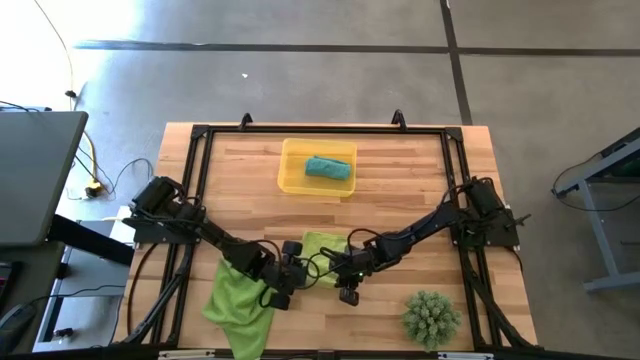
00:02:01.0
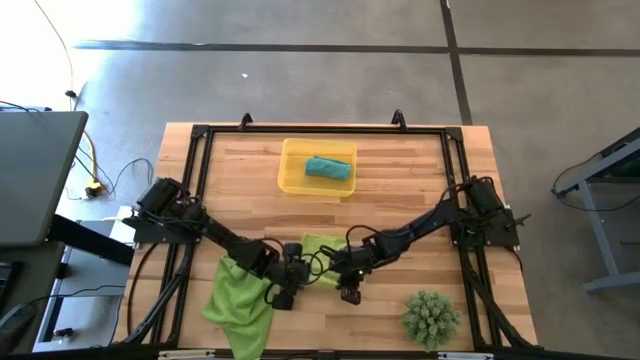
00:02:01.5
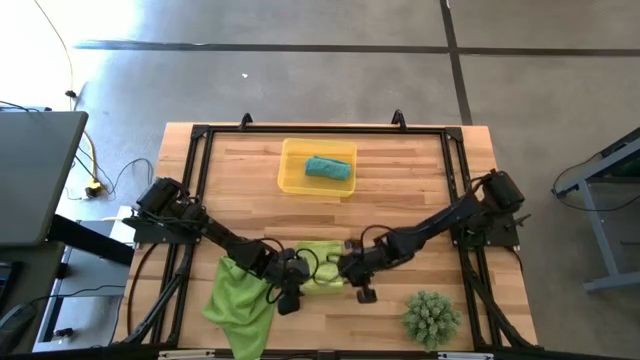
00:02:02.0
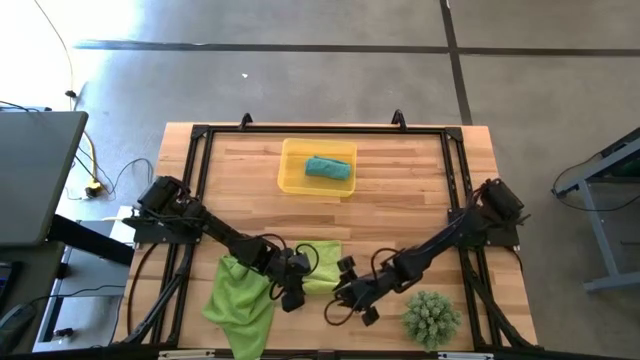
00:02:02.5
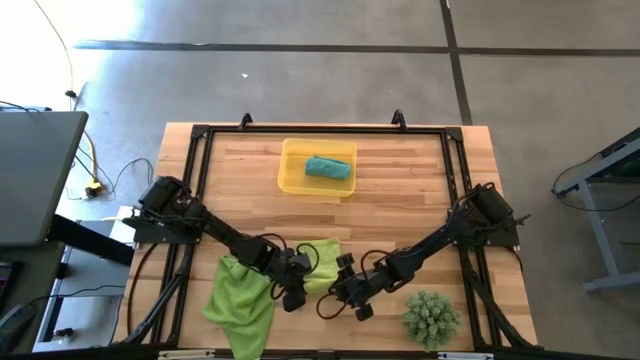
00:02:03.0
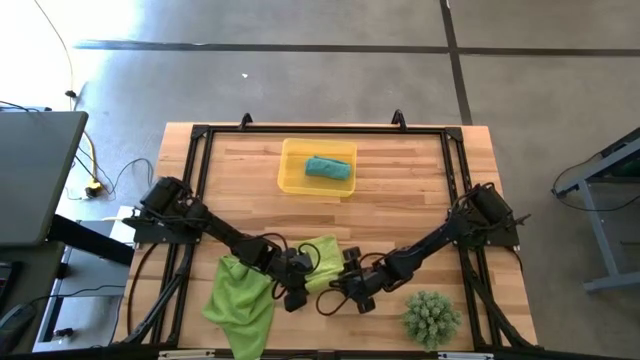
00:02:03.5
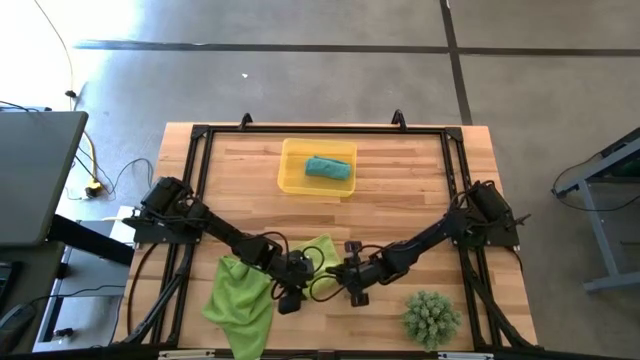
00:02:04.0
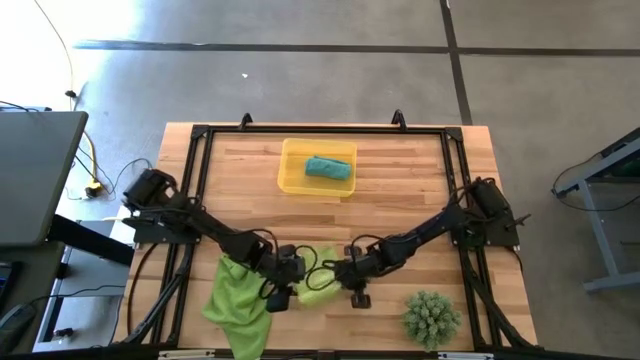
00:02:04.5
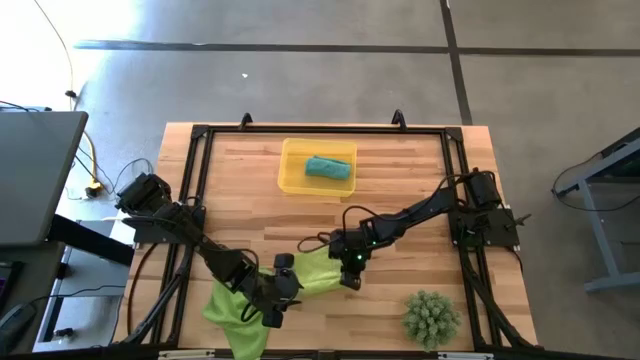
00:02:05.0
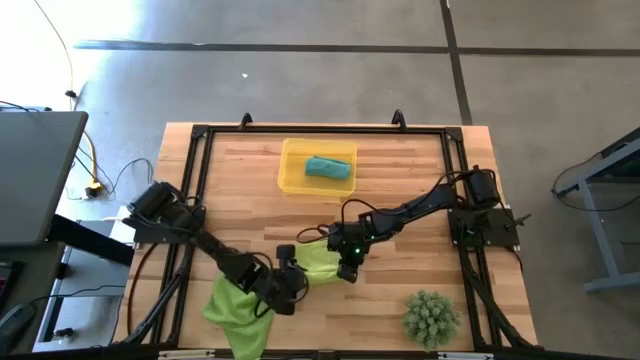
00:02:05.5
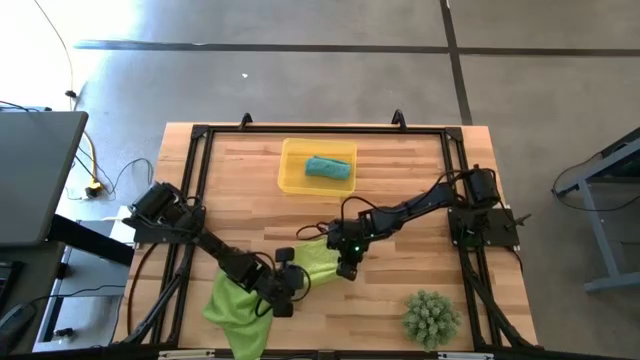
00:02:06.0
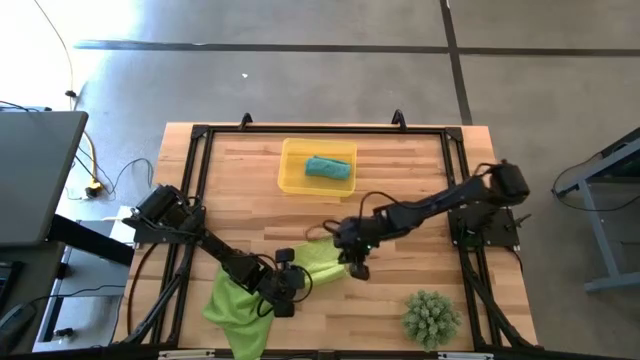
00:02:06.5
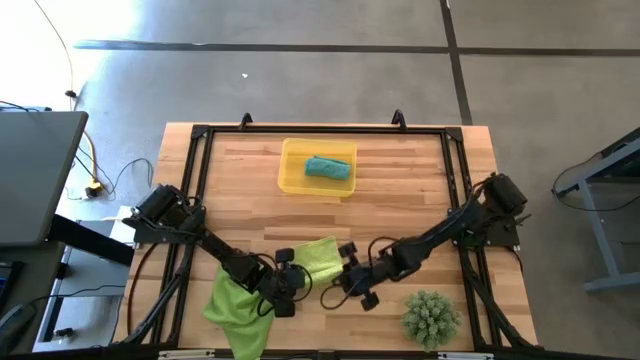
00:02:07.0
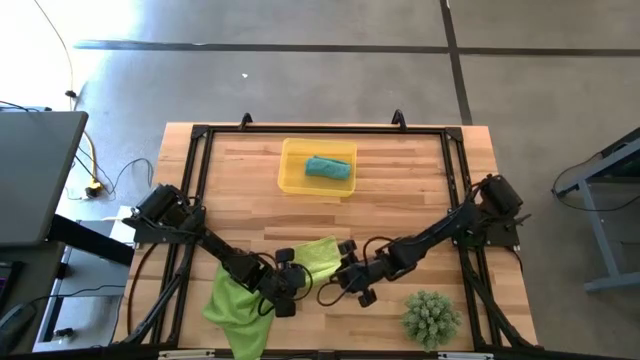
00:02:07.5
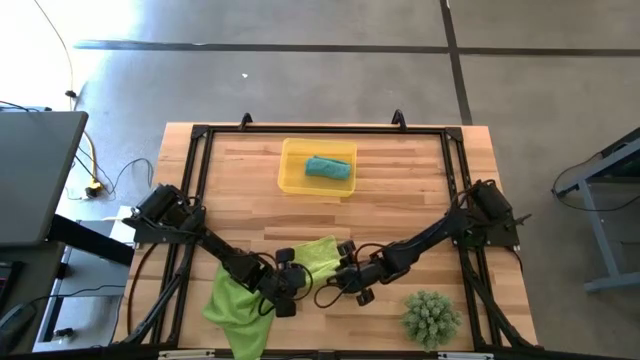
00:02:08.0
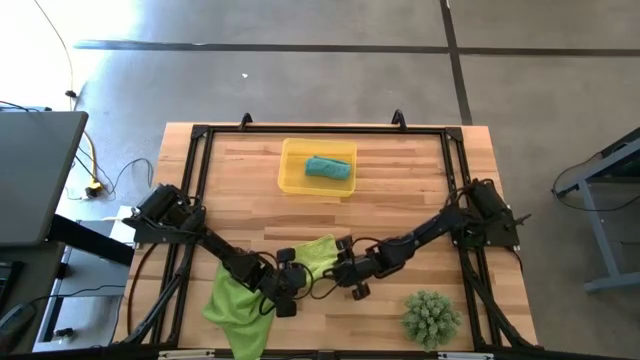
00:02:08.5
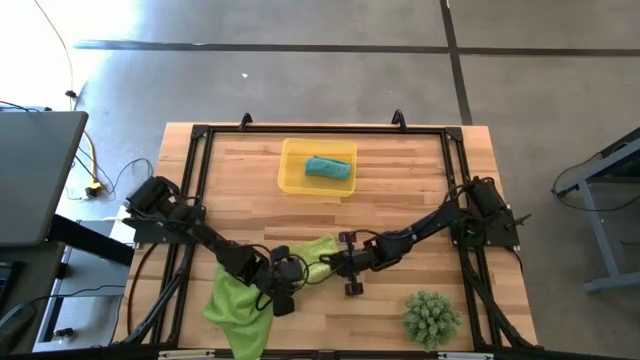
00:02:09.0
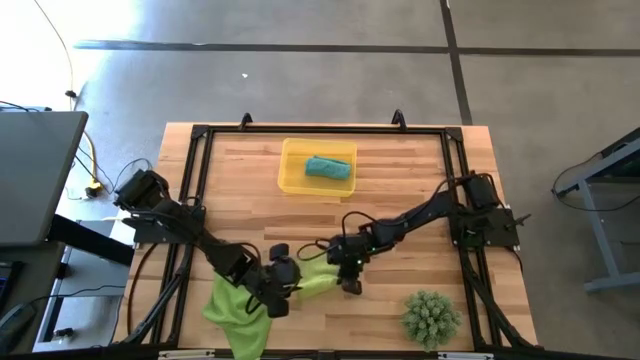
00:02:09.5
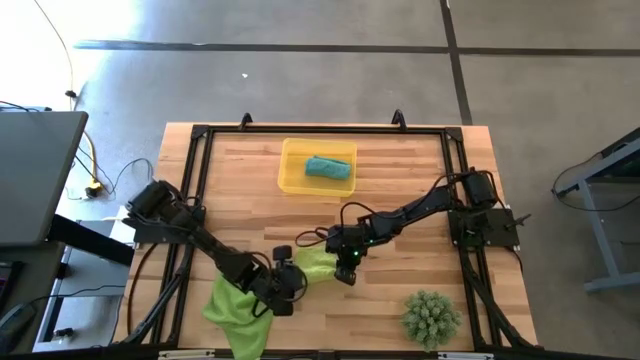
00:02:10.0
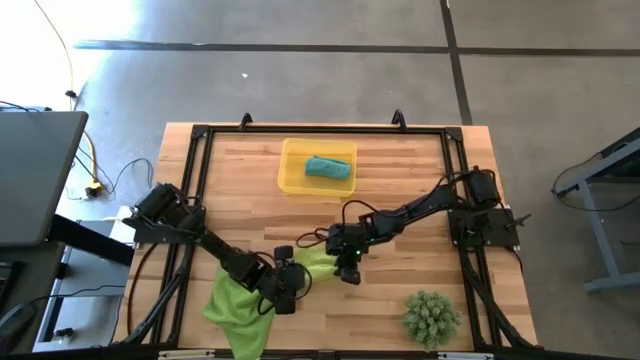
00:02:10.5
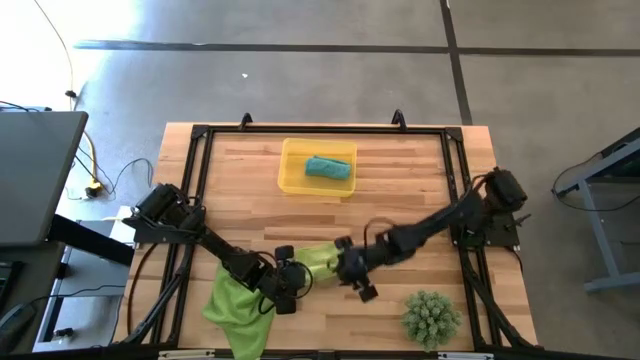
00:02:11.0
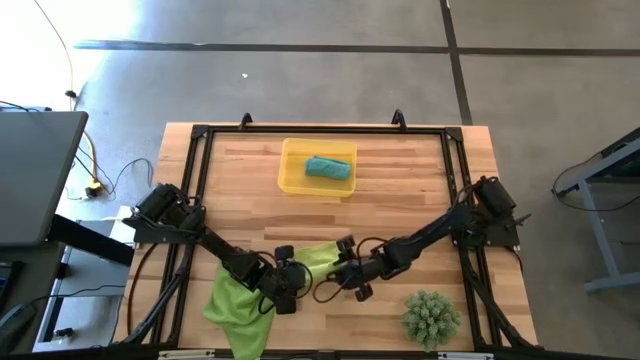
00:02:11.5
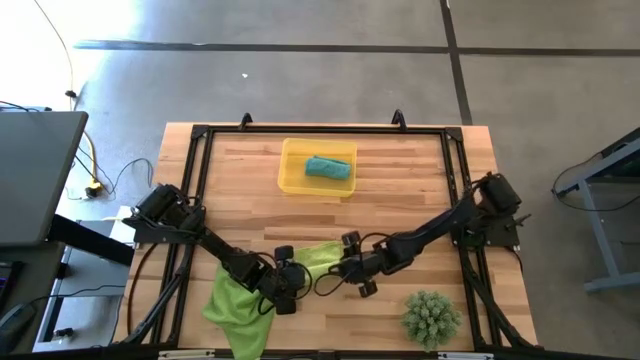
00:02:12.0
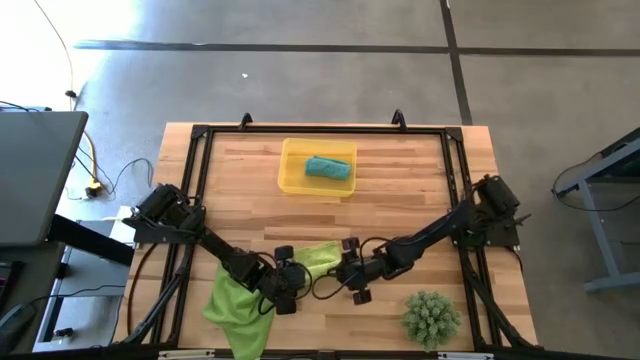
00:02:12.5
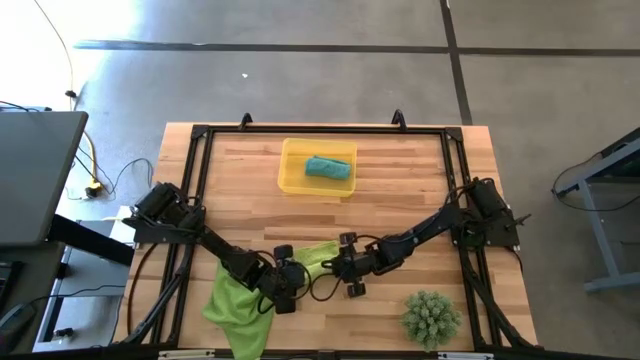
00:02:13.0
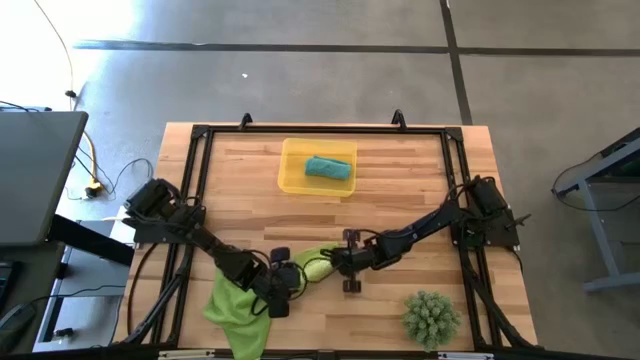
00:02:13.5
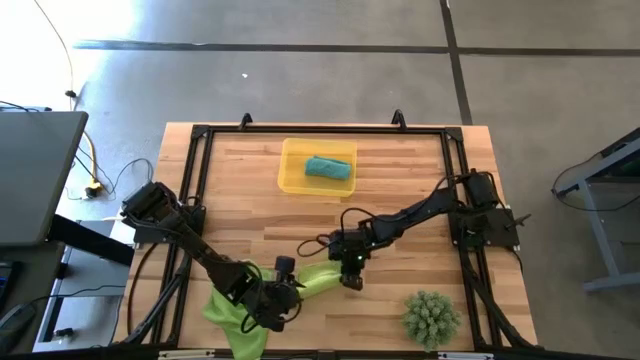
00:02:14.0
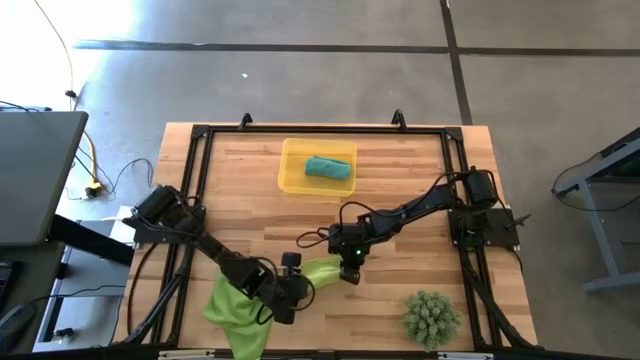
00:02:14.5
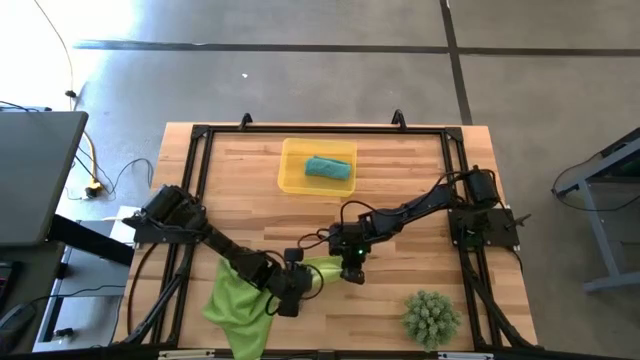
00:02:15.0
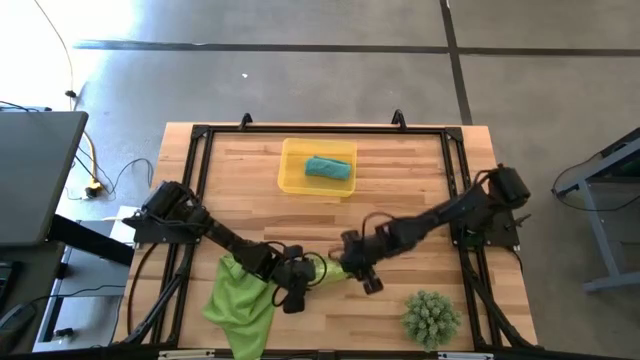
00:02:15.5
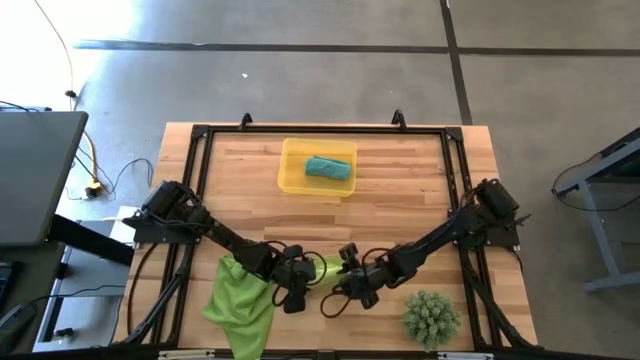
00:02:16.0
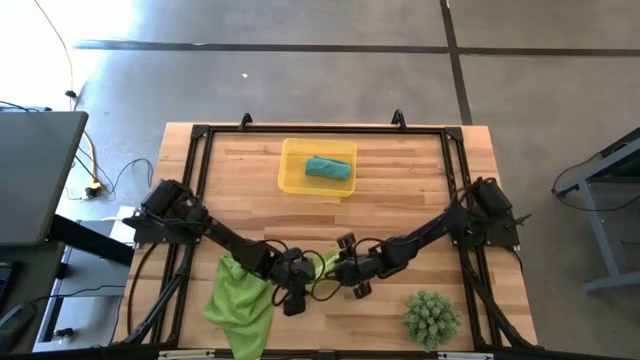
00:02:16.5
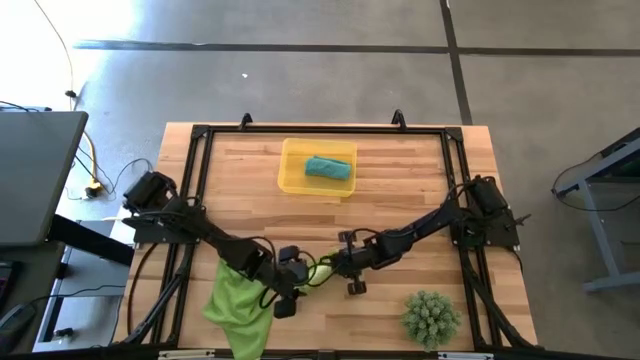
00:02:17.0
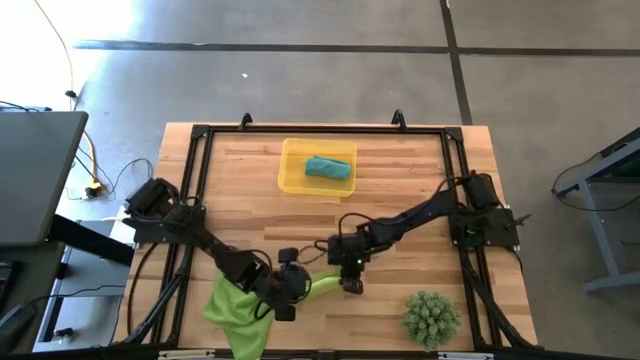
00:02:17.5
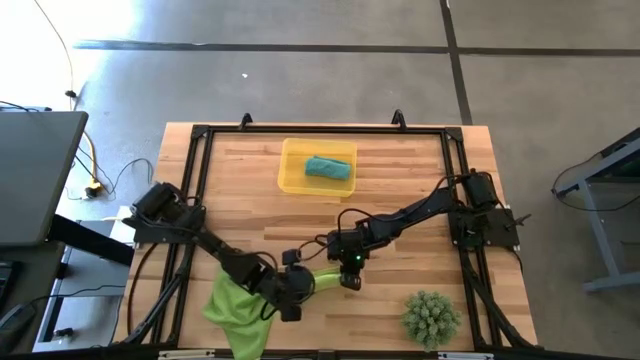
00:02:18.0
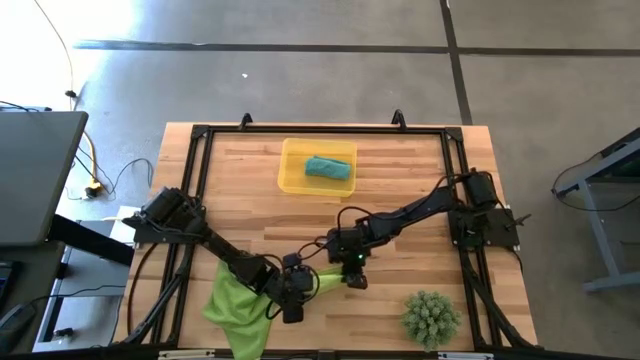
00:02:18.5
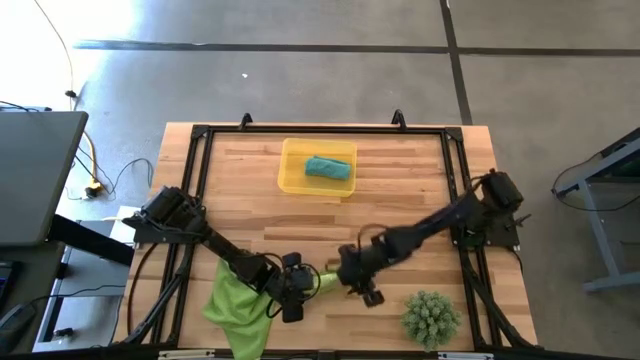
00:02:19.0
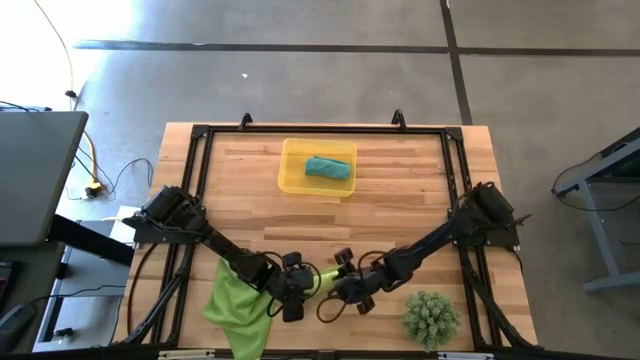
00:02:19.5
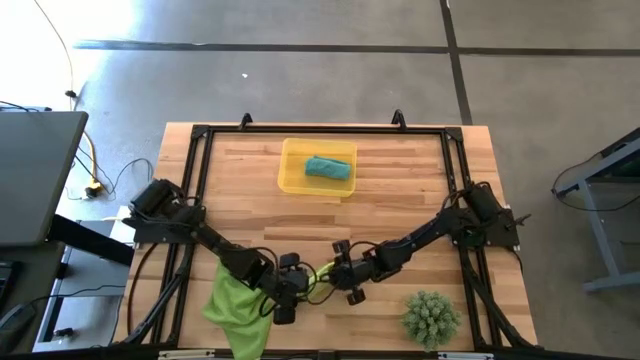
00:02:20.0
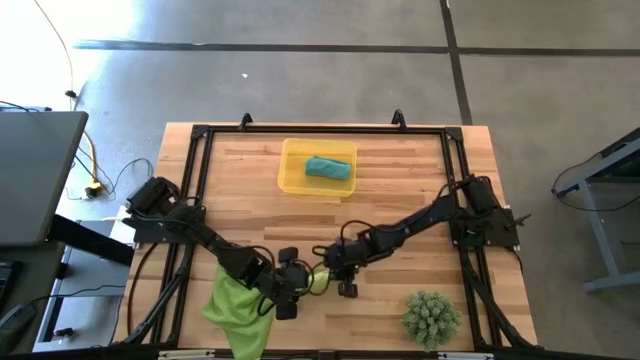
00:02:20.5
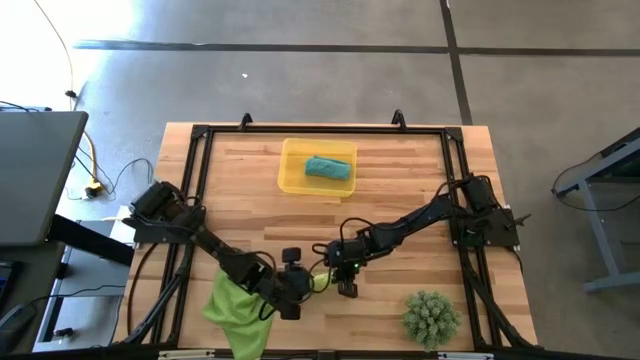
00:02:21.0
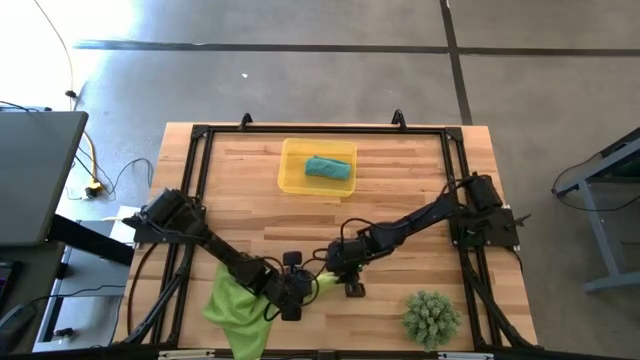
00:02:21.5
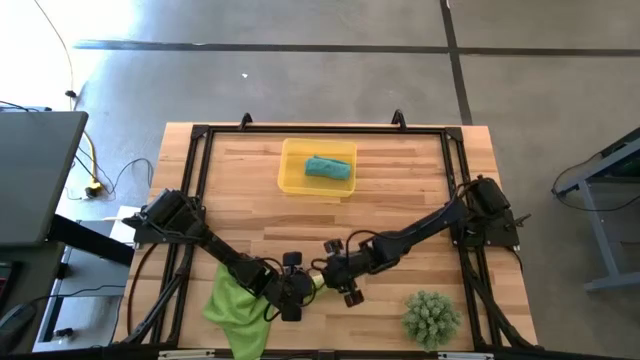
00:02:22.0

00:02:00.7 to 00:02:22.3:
Task: Roll microfiber towels into tight, uniform cylinder then place into a basket
Roll the light green microfiber towel
